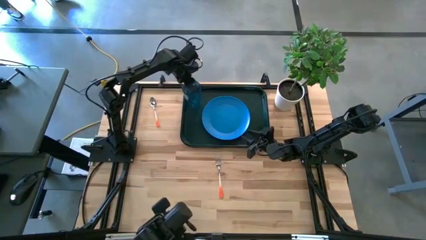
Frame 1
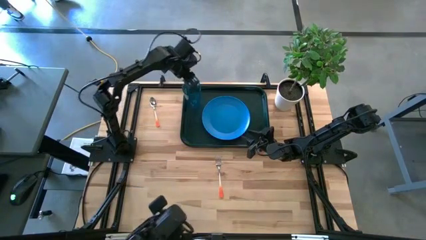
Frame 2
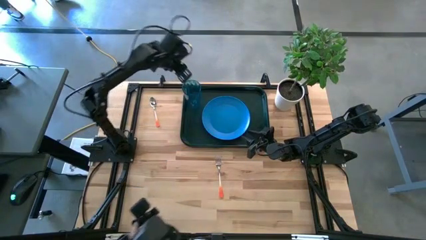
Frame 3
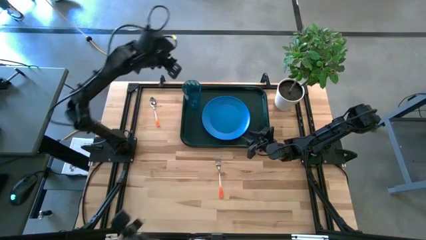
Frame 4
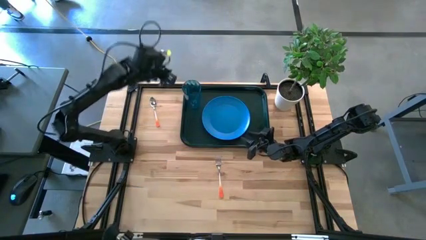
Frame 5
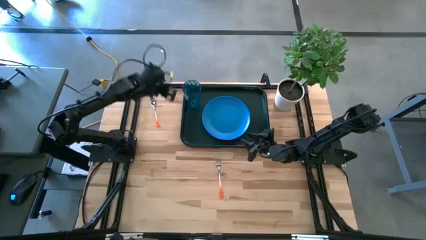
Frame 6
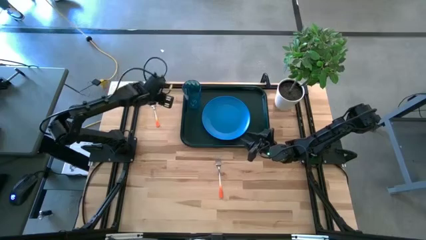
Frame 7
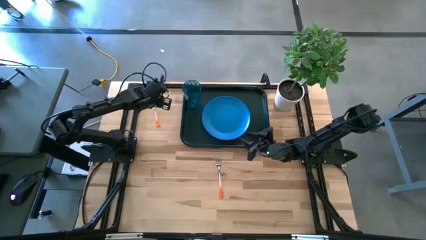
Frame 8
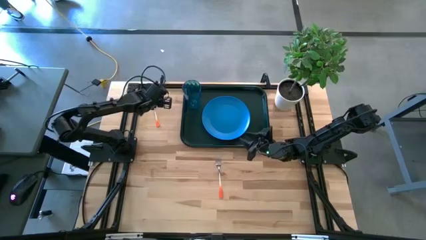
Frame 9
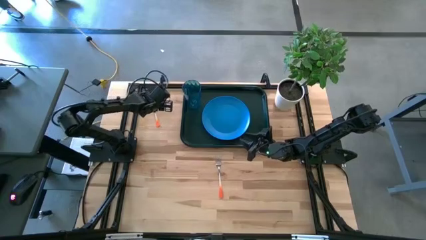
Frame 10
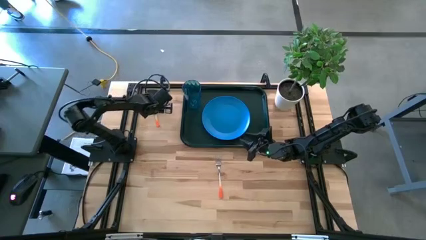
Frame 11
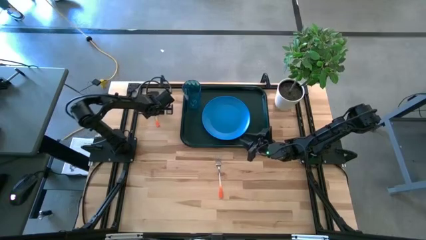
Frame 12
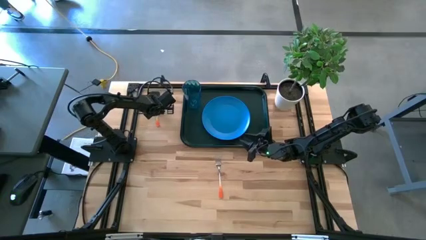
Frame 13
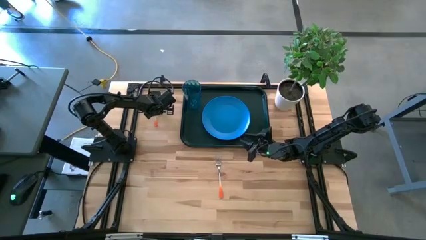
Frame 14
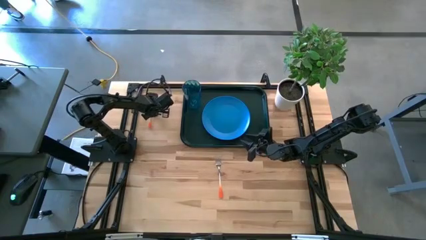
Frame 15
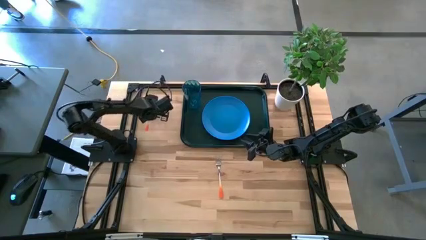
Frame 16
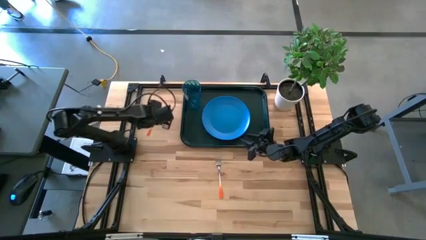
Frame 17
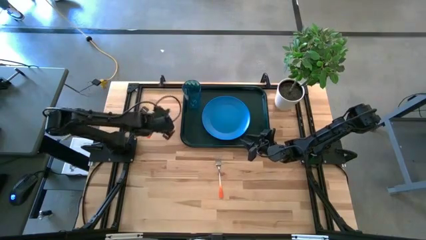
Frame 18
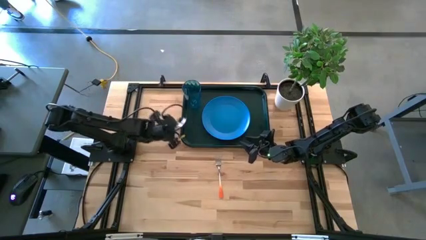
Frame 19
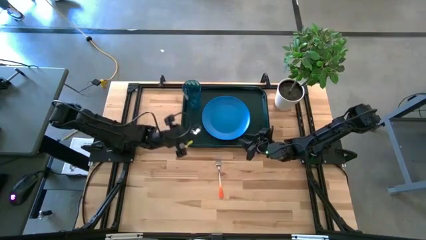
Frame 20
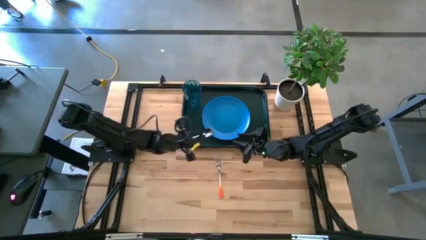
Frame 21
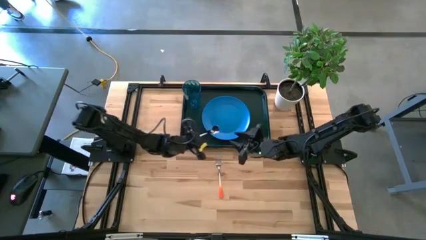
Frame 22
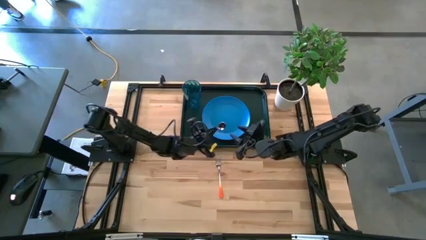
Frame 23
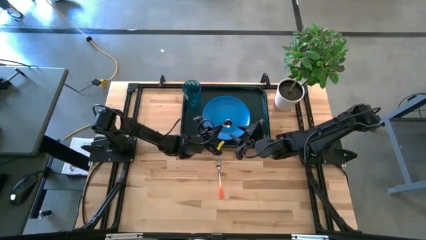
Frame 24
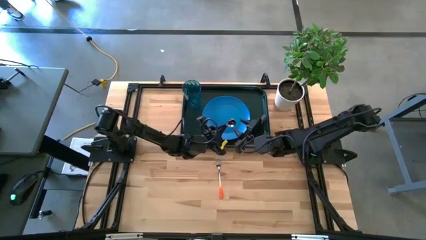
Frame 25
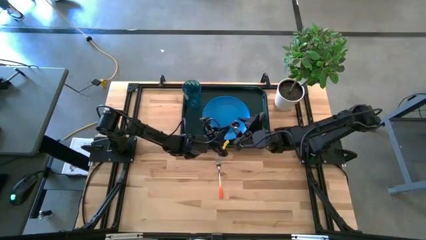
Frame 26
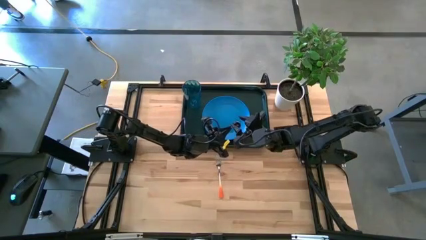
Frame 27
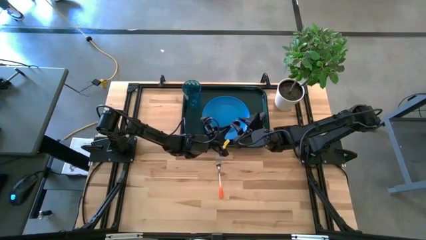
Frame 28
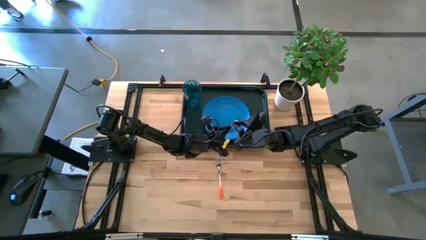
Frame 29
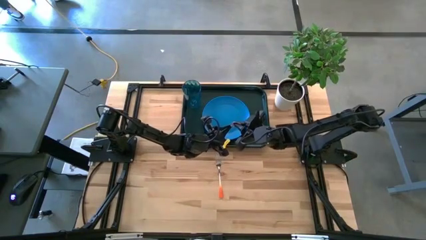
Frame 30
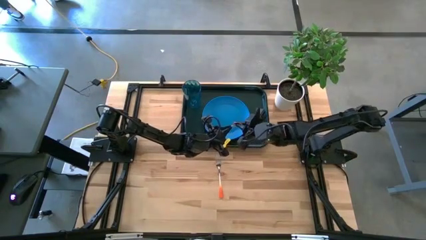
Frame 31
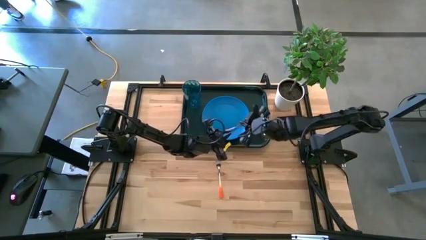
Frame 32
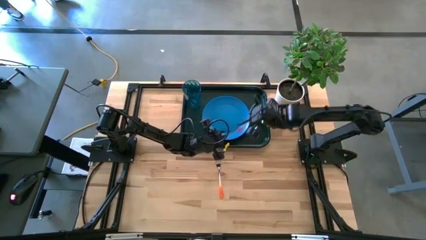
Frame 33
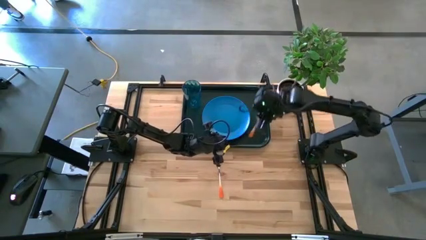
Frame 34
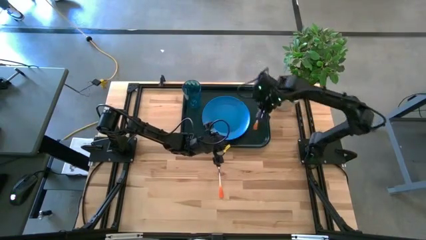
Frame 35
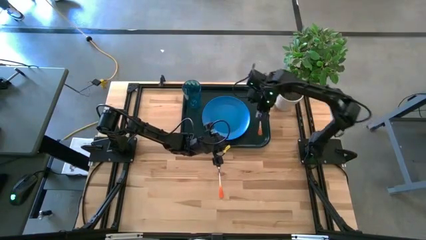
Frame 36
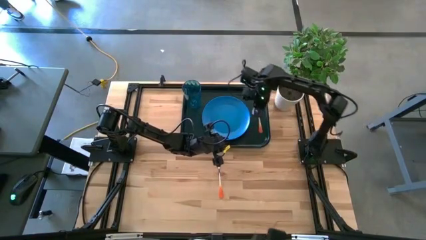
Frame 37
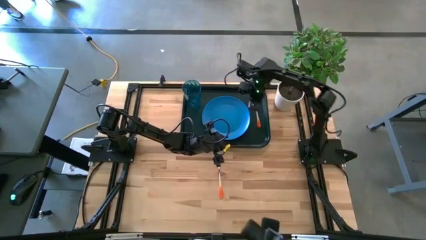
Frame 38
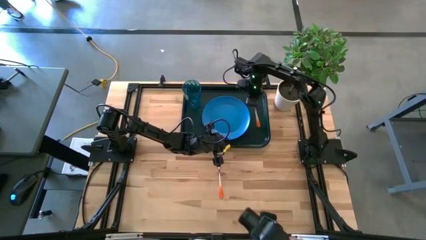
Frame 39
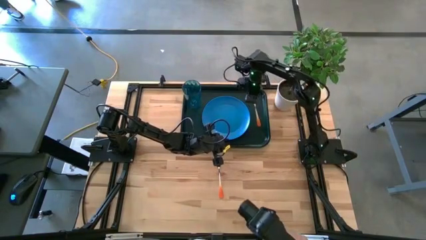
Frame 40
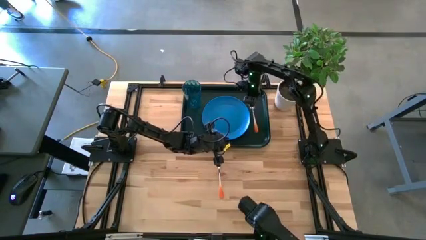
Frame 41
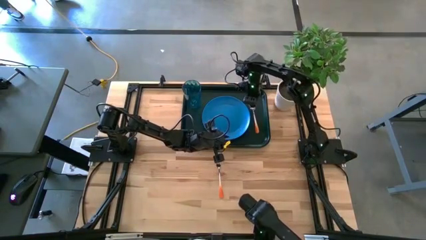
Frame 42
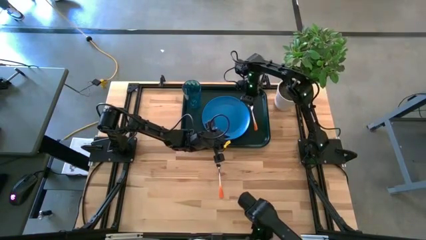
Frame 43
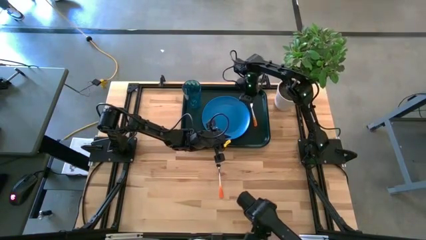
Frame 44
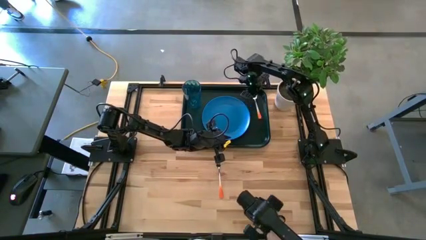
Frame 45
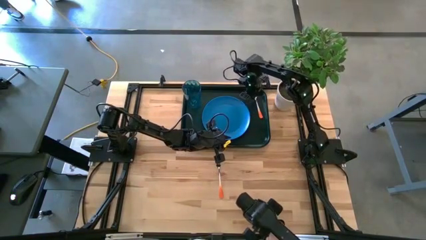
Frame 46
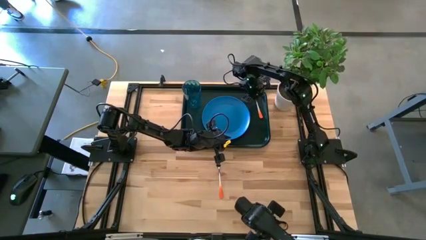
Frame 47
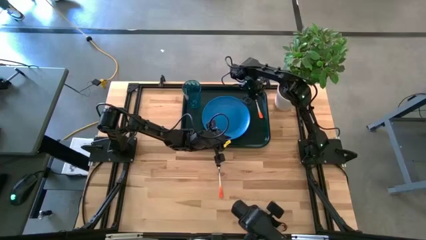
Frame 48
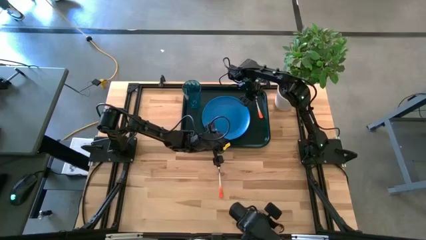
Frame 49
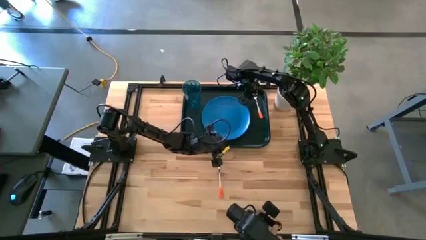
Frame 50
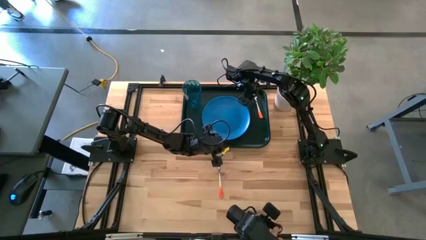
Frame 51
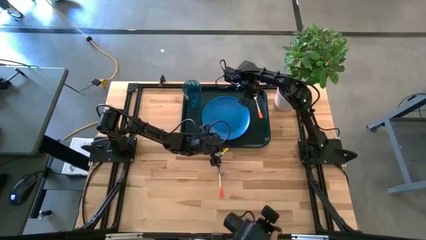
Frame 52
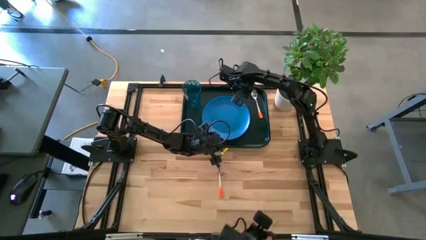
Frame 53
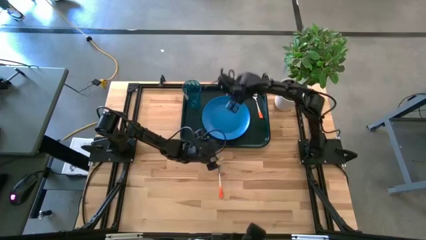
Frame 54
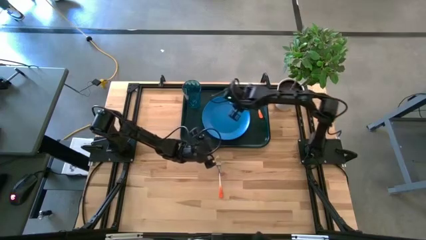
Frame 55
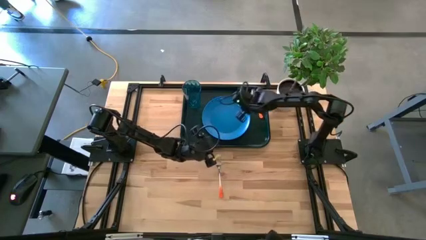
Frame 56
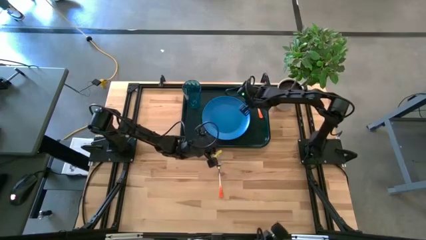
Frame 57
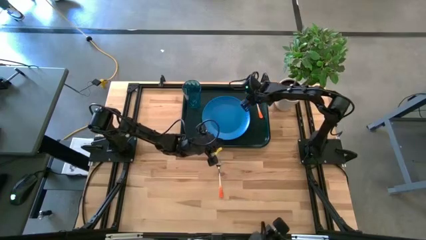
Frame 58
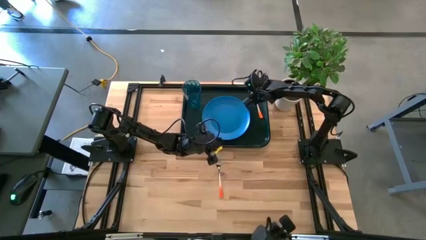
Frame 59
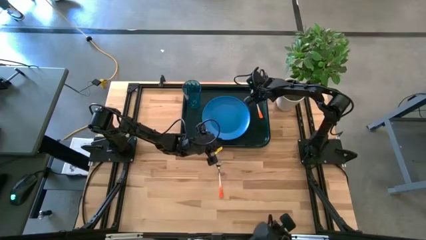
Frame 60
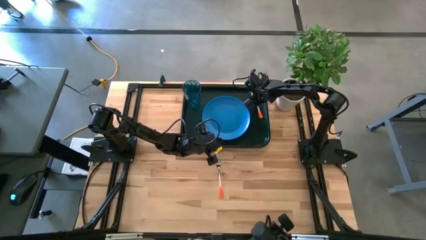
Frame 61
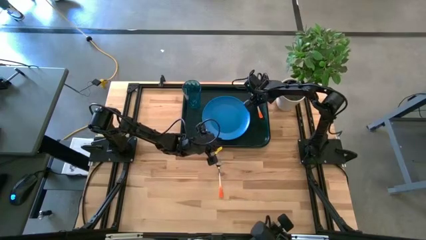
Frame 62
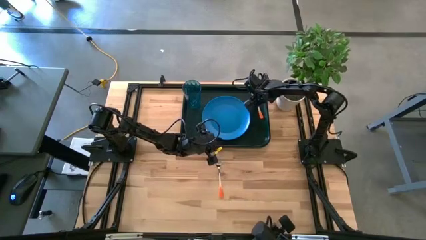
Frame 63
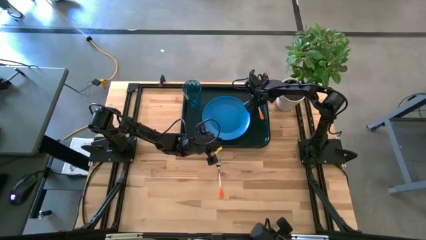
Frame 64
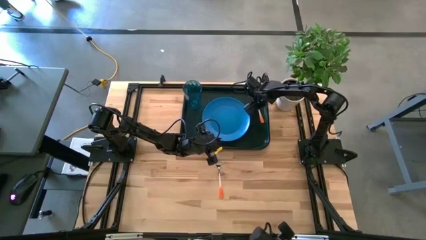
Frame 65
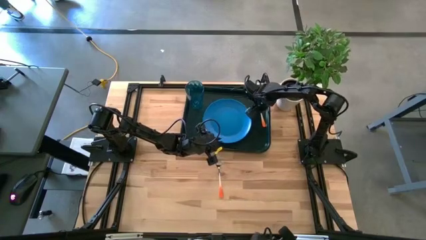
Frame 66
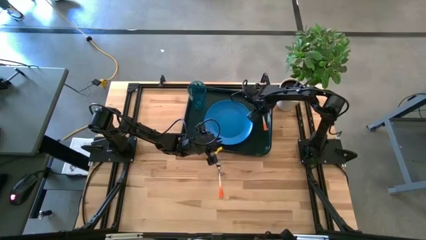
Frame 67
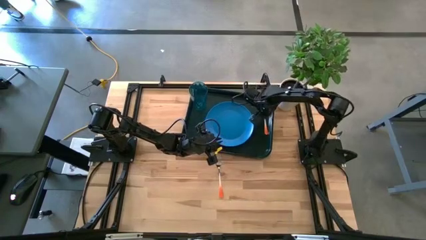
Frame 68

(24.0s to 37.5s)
Task: Pick and place plate/cup/fork/spoon on tray
Put the orange spoon to the top right of the blue plate on the green tray

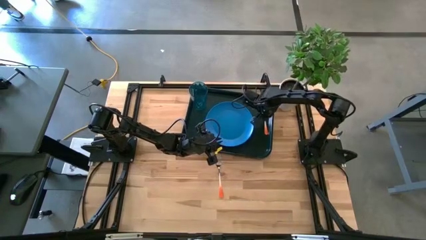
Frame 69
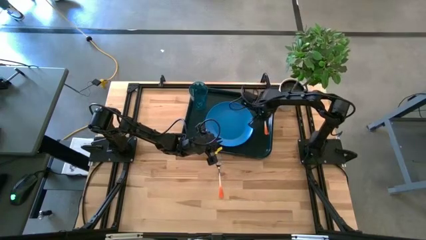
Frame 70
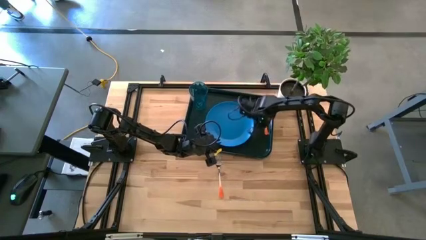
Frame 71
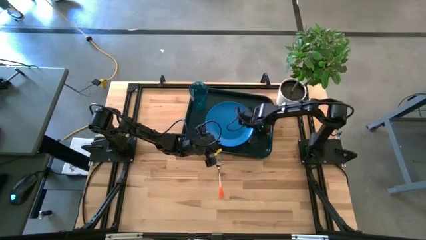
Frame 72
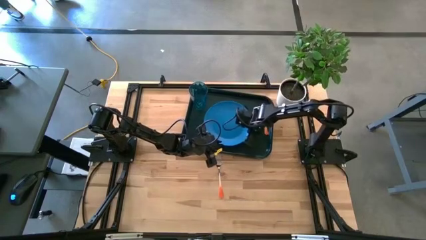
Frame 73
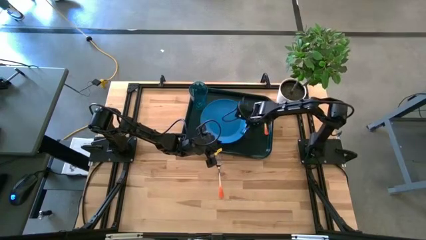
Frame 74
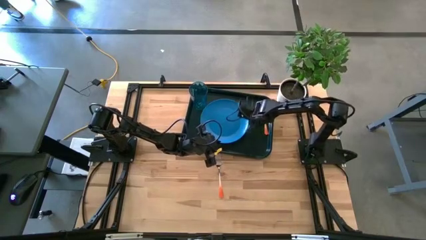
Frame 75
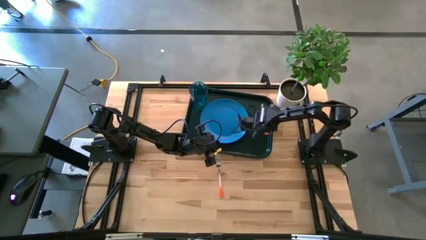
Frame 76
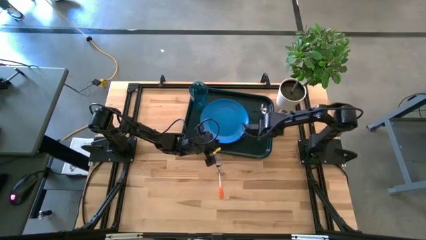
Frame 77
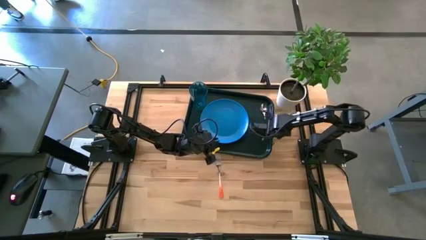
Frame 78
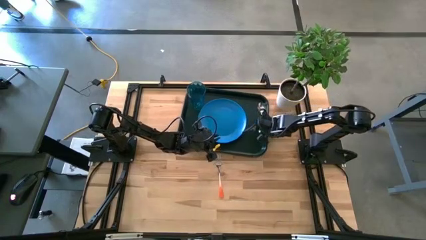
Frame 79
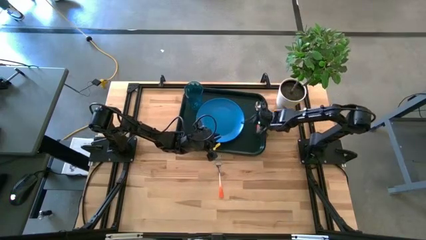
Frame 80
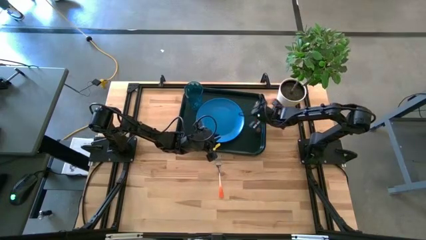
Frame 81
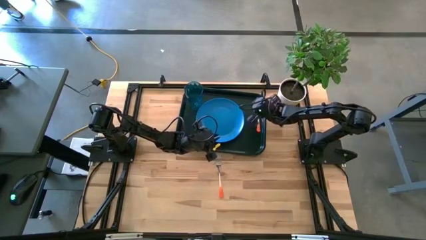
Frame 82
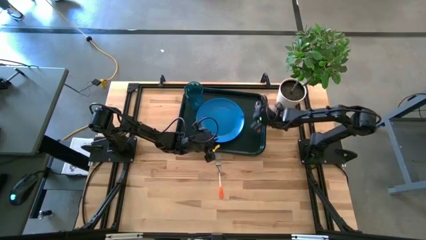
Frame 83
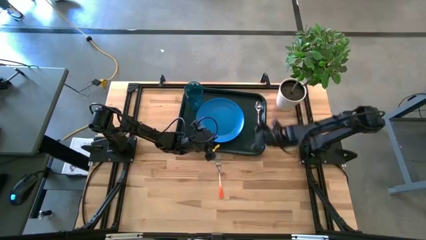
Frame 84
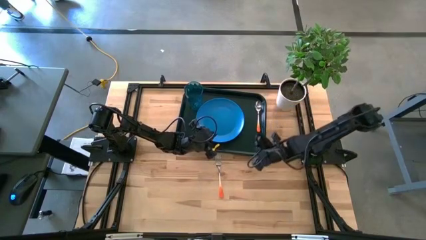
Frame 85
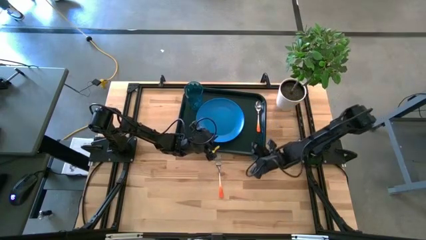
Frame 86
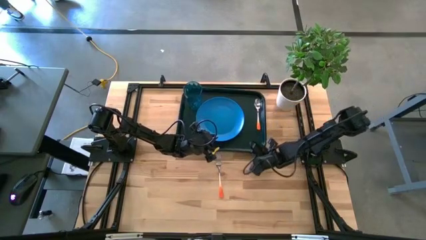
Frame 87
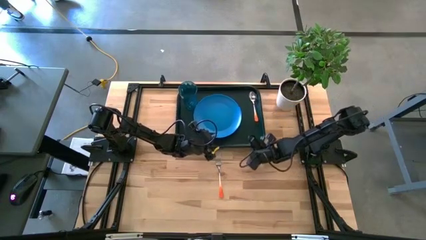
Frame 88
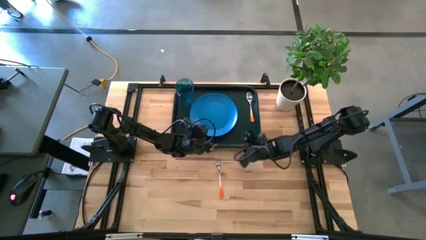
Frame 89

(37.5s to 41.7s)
Adjust the green tray
